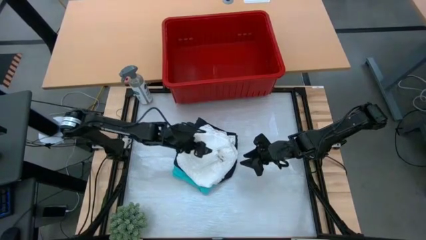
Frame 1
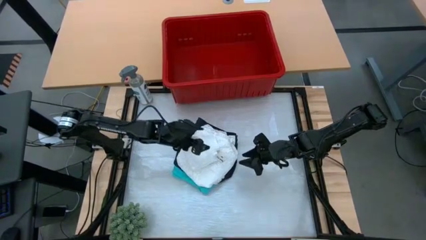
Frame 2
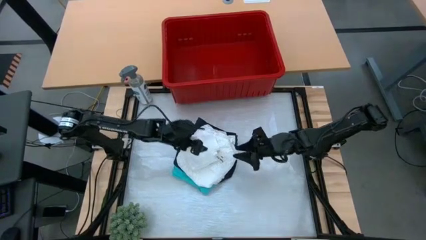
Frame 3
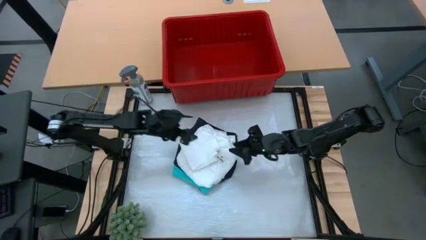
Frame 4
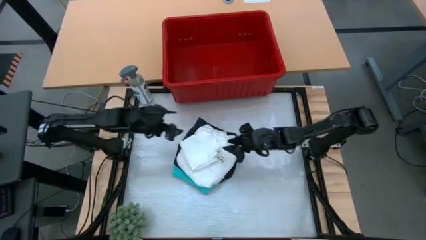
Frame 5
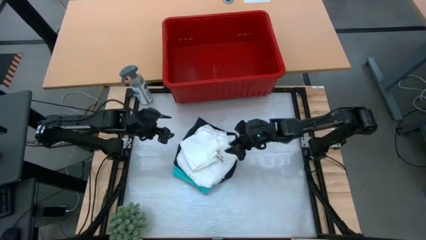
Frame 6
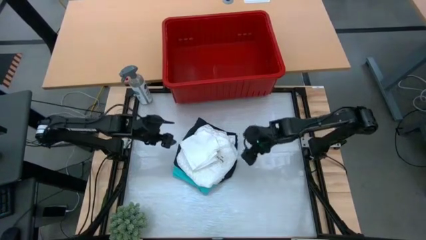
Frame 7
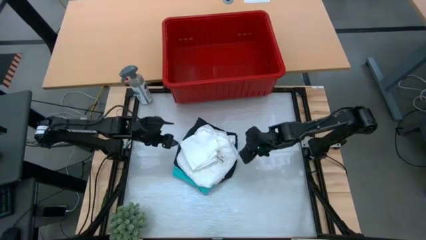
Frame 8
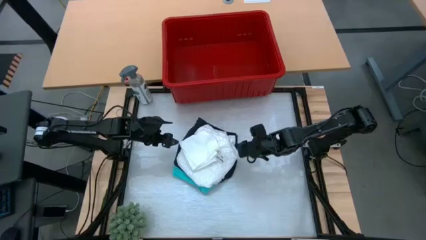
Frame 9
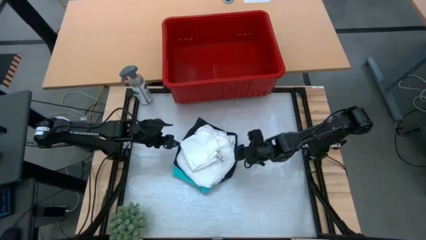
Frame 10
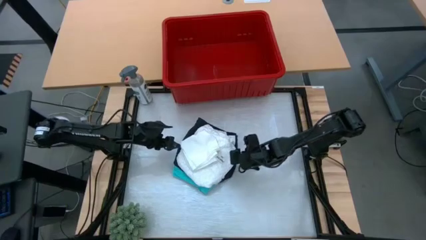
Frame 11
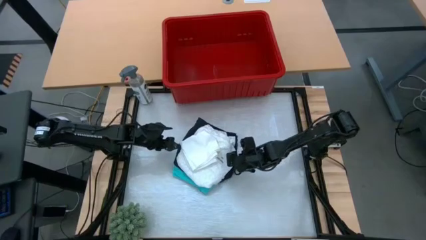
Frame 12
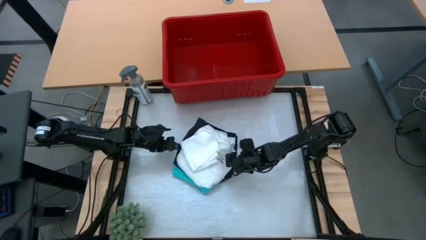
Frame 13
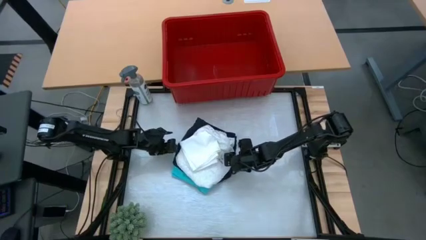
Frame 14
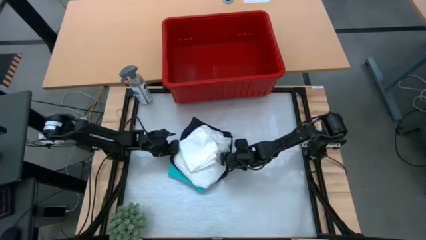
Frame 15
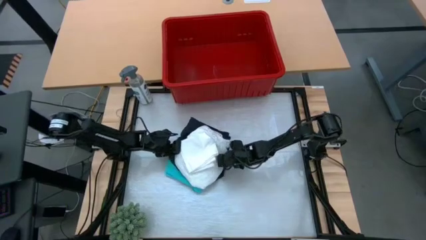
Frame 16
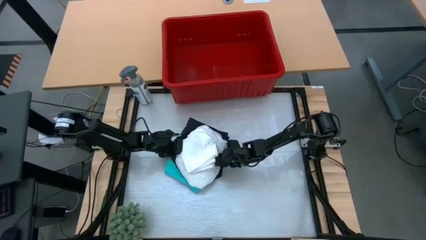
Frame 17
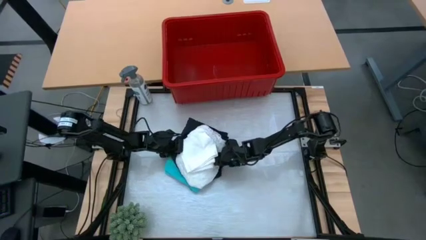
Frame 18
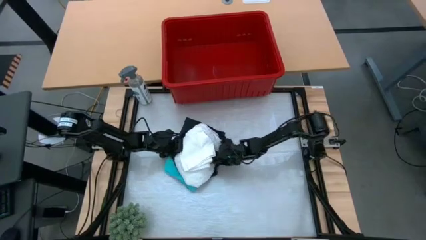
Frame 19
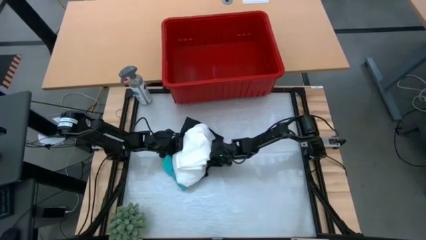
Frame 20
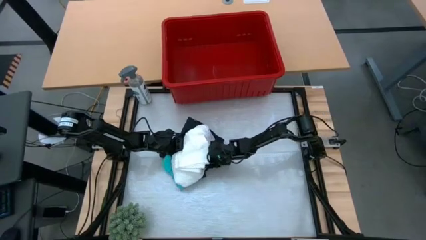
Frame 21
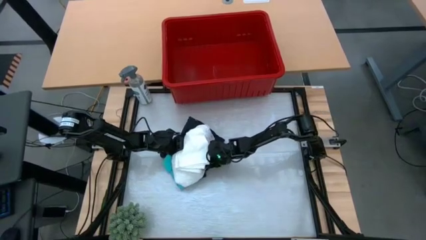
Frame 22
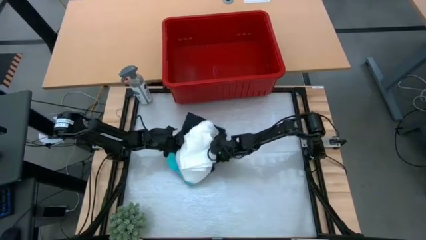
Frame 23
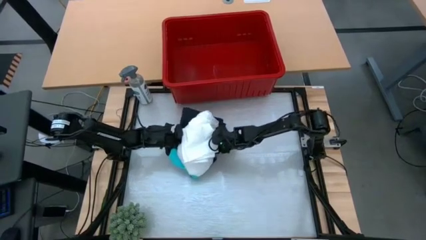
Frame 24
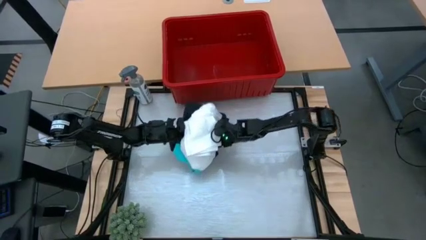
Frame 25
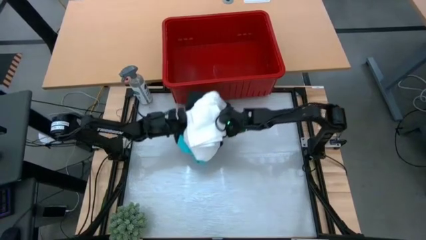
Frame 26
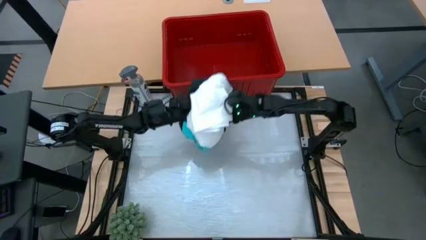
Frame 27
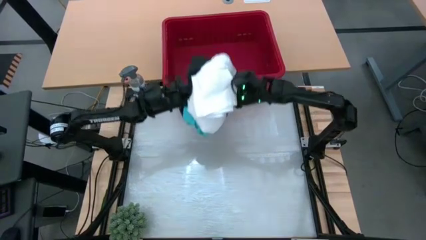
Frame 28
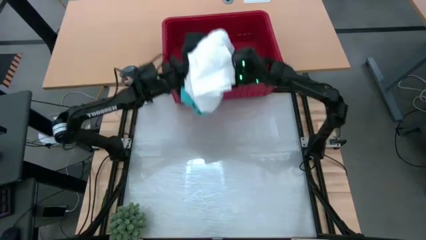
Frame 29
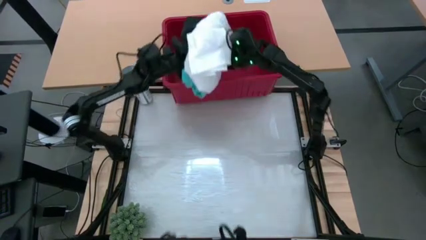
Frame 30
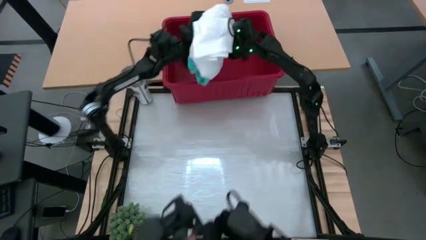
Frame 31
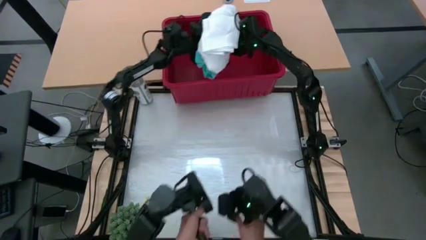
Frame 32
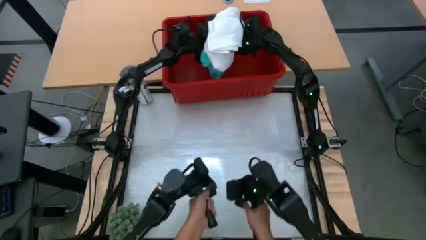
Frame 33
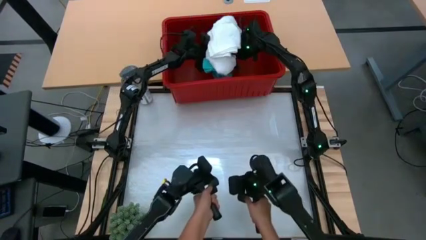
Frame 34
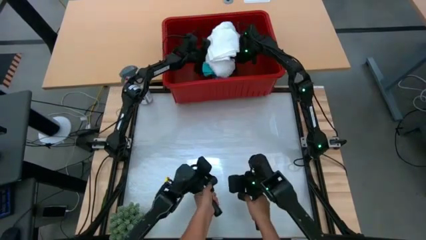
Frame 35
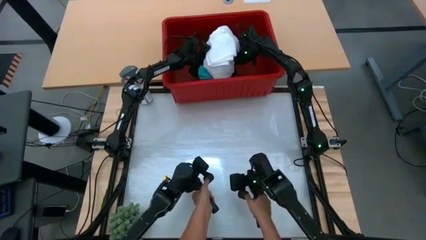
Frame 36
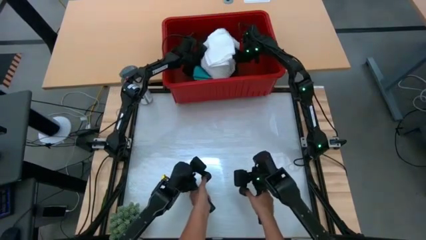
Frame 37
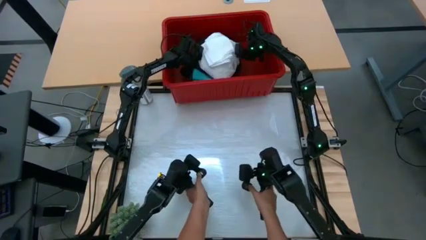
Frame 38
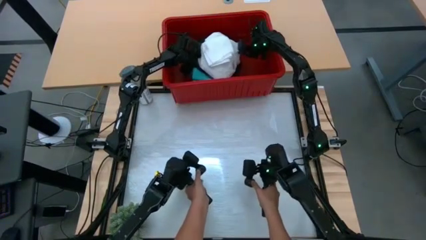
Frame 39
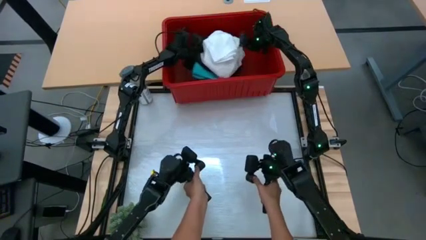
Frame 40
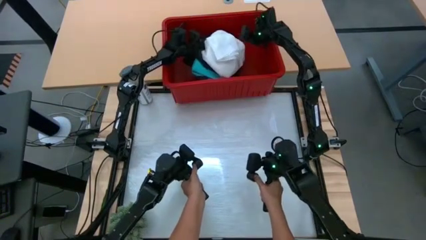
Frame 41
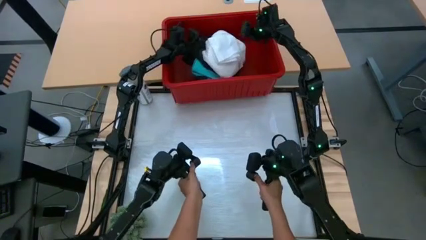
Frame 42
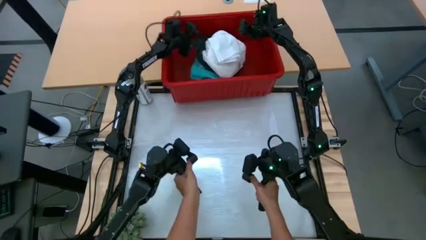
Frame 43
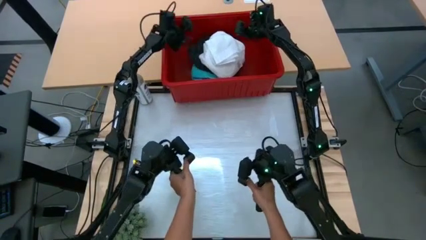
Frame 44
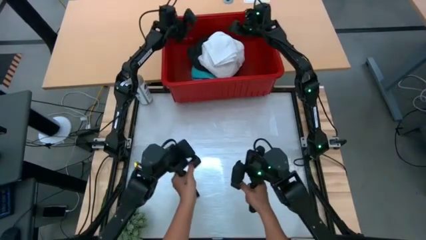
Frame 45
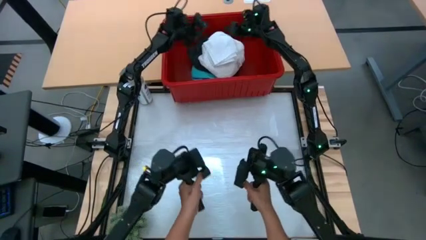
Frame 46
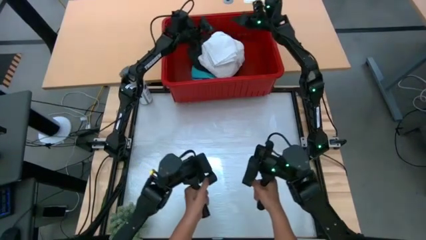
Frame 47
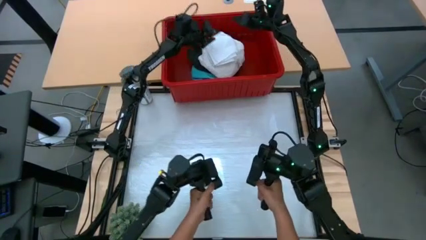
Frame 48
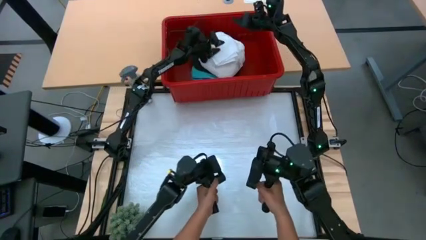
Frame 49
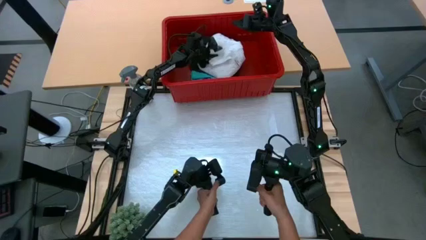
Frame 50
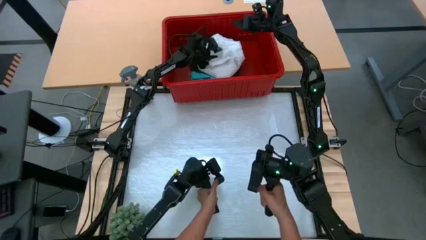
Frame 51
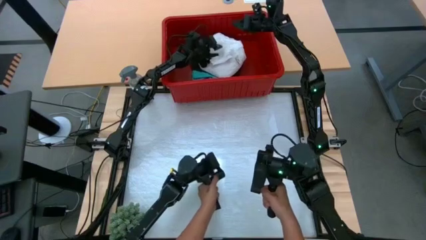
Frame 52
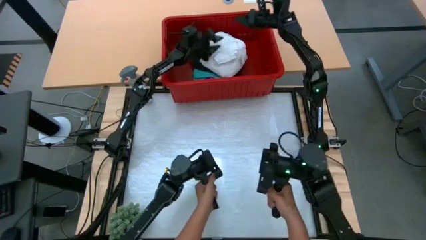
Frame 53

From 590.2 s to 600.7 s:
Task: Fold laundry
Put the stacked folded clothes into the red laundry bin

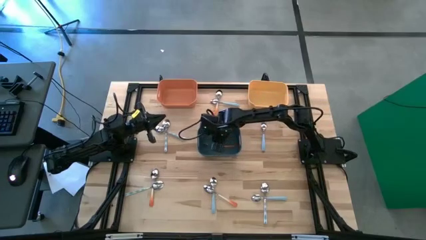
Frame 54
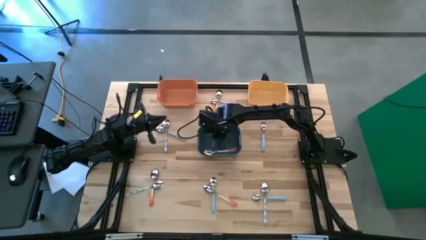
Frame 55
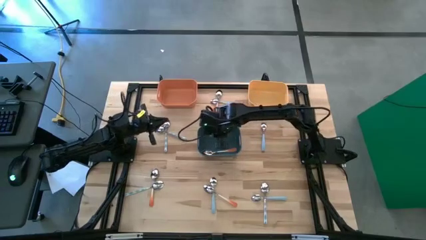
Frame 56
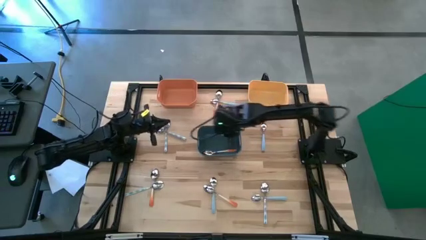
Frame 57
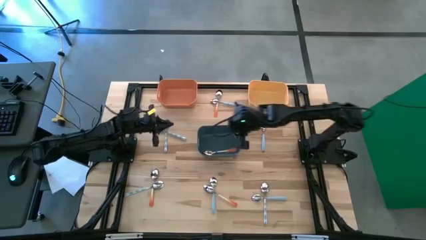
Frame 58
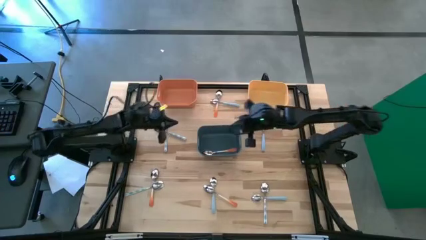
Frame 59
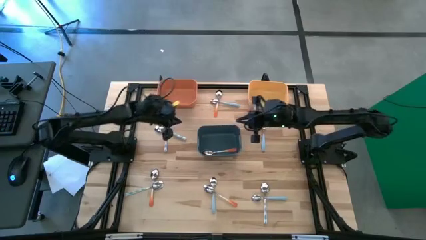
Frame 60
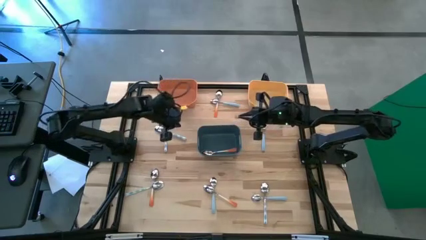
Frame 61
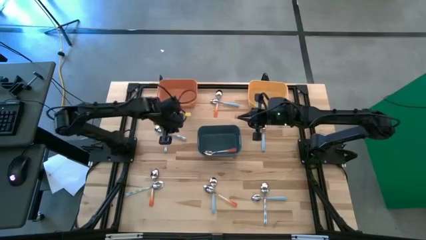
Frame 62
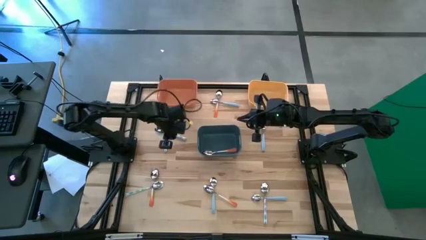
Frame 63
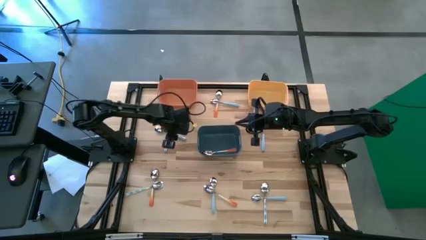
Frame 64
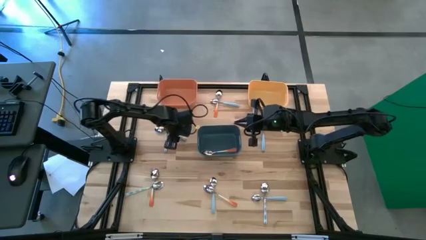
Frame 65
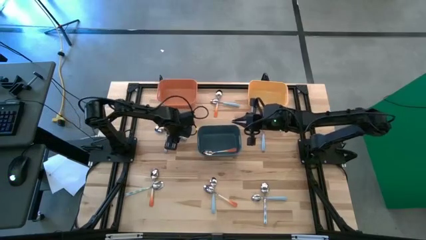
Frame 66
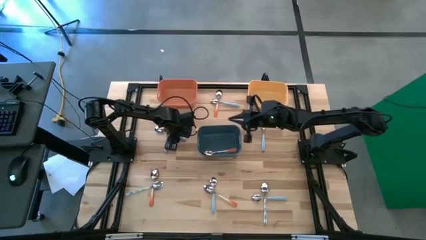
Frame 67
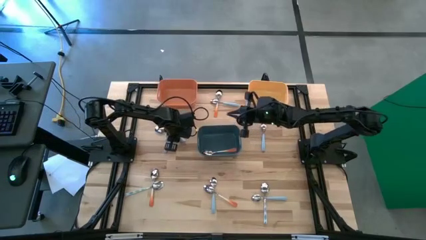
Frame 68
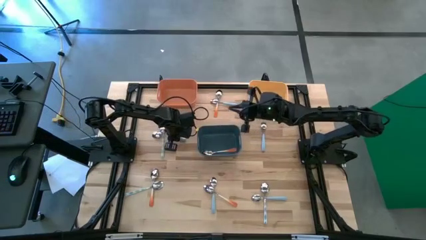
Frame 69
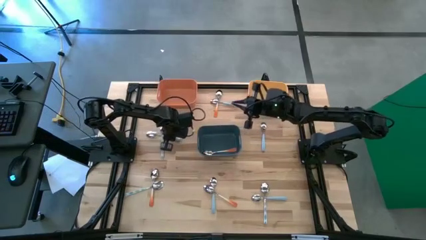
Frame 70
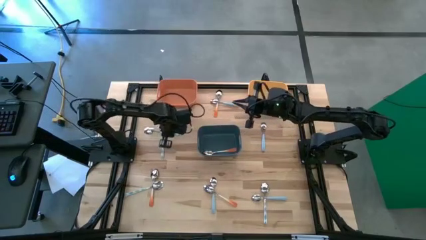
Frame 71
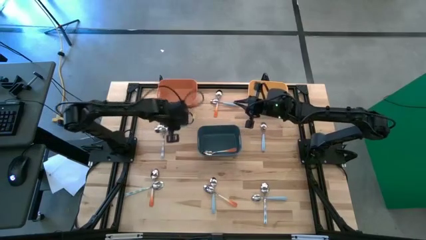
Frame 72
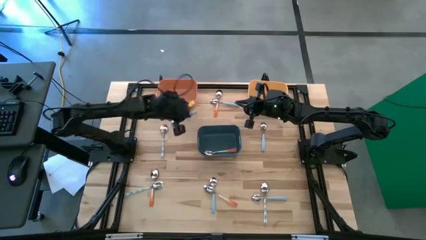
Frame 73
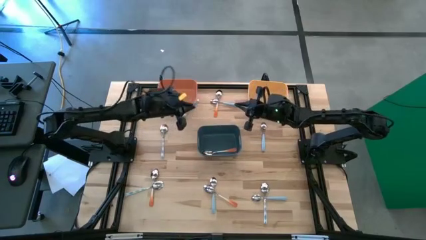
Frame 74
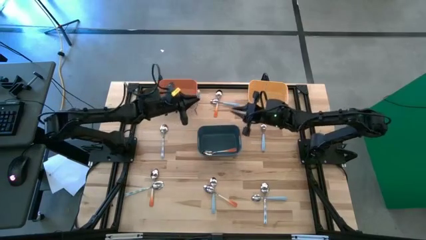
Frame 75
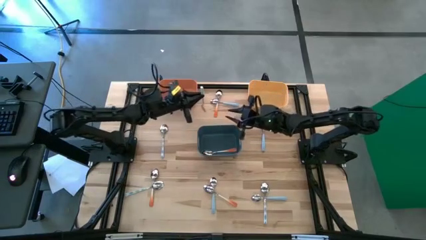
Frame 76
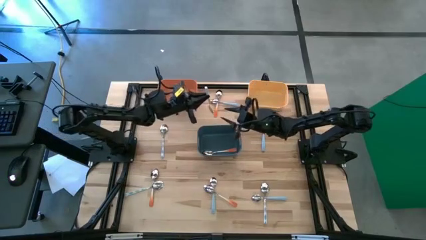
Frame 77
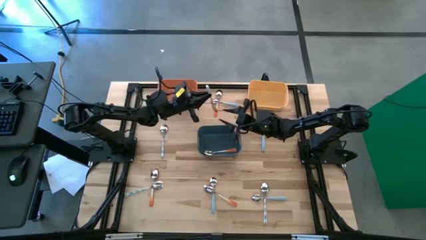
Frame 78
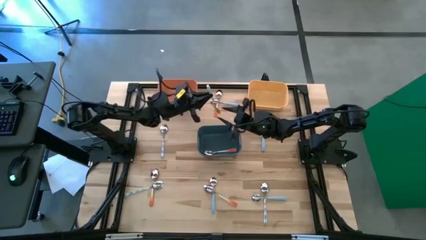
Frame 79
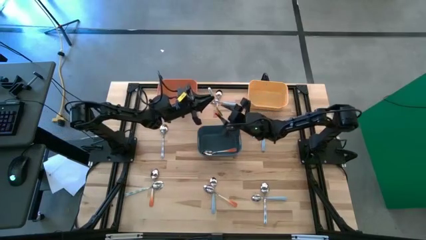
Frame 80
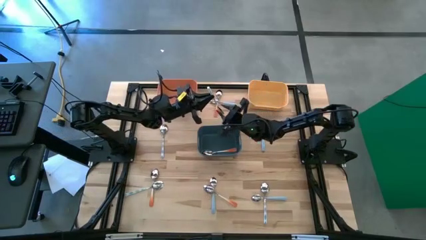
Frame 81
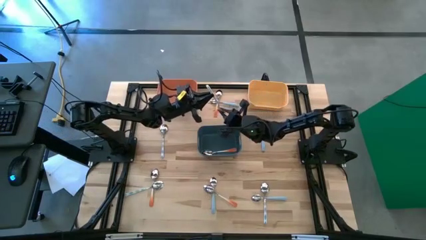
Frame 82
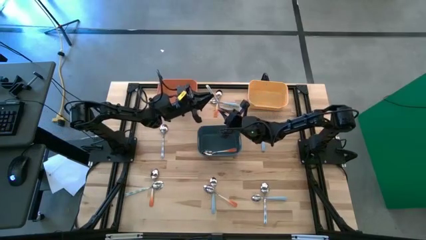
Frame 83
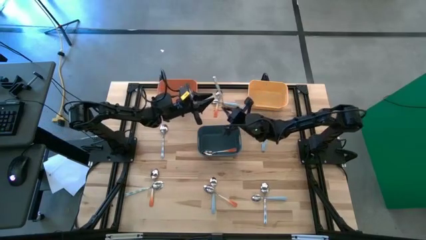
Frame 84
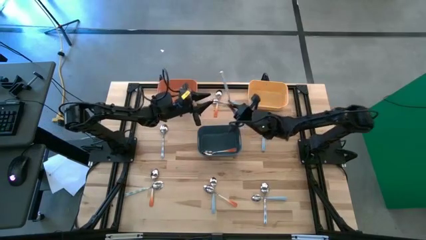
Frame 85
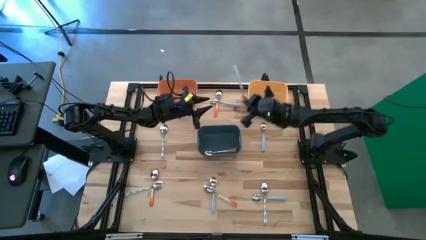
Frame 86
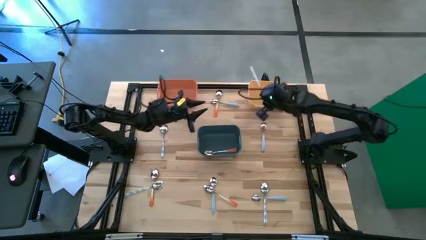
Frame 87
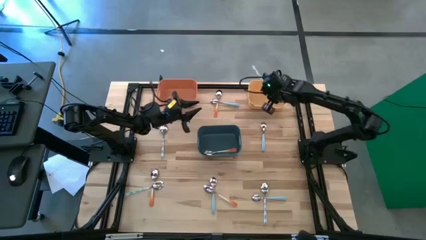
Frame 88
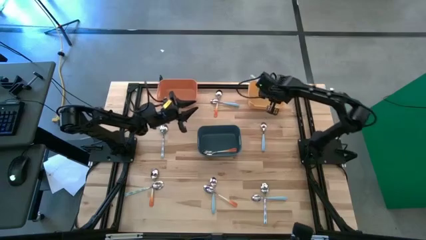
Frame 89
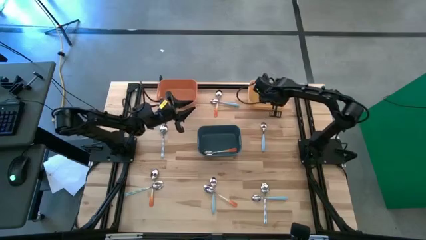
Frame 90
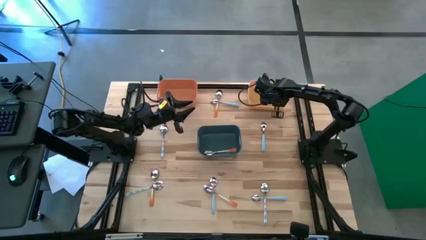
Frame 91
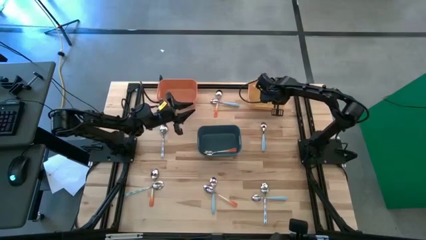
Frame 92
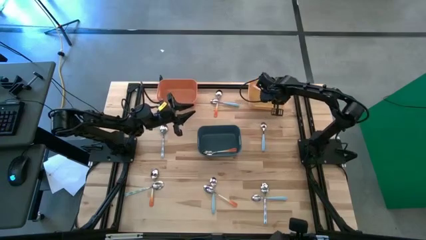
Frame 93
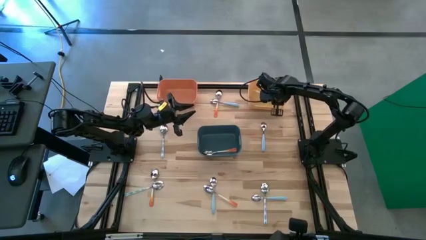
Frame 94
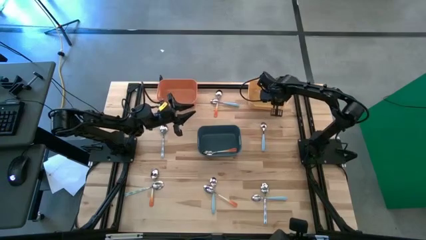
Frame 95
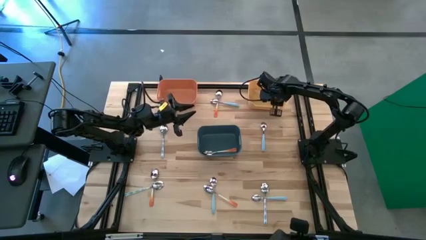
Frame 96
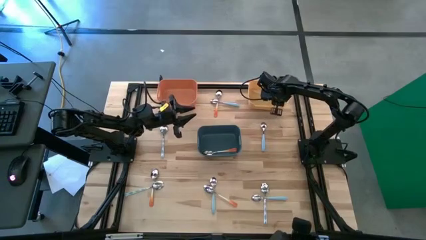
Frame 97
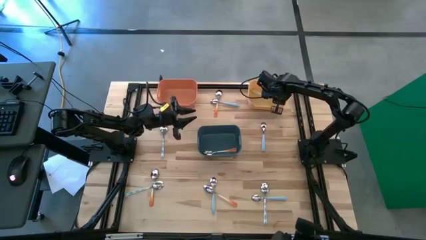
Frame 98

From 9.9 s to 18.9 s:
Task: Sort silverware by color (type)
Put the white-blue spoon into the yellow bin
